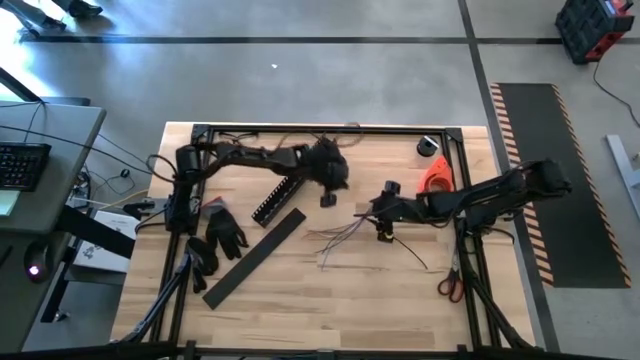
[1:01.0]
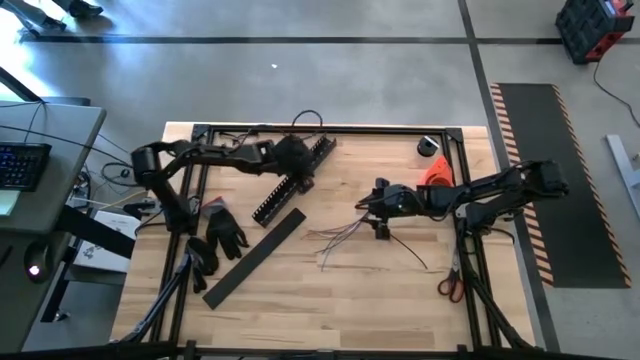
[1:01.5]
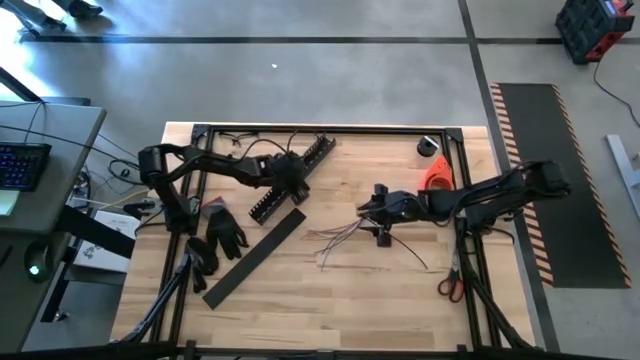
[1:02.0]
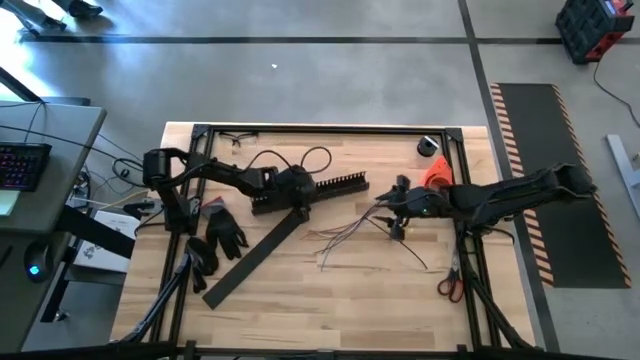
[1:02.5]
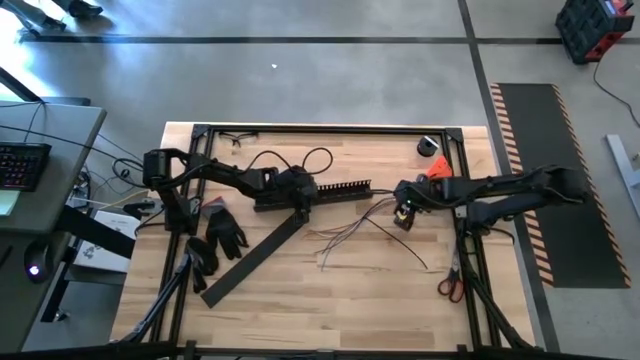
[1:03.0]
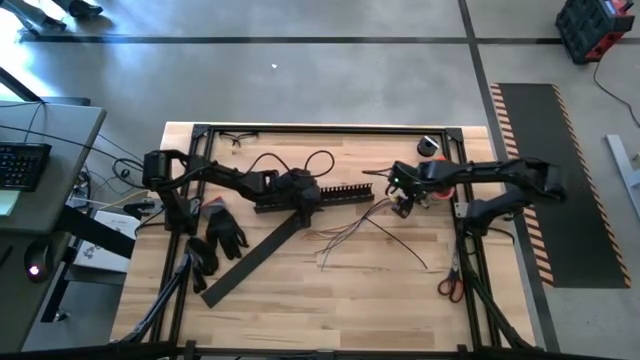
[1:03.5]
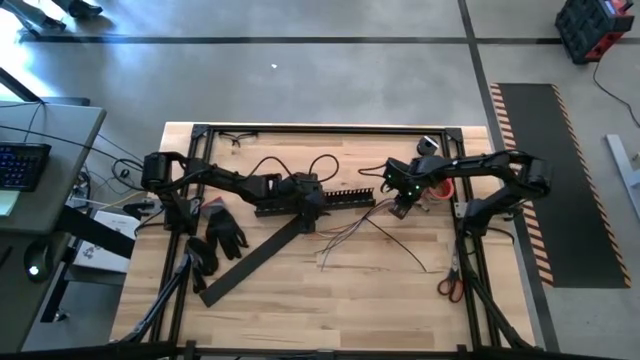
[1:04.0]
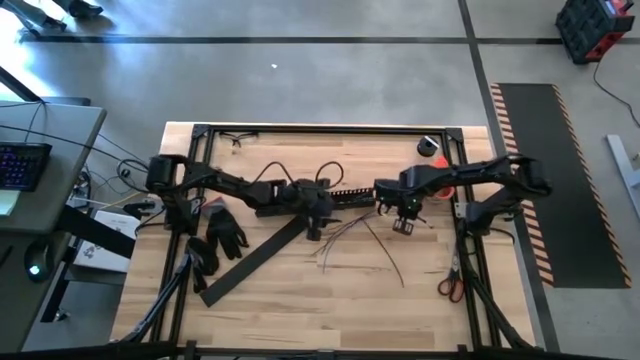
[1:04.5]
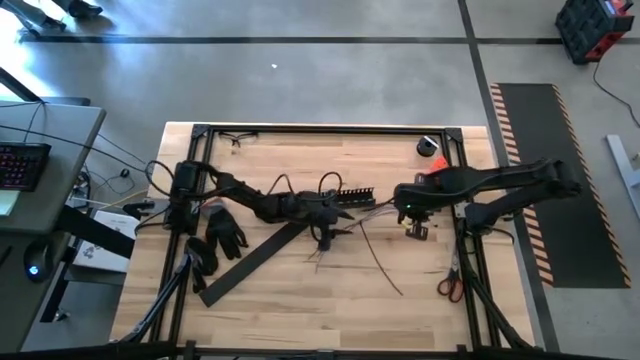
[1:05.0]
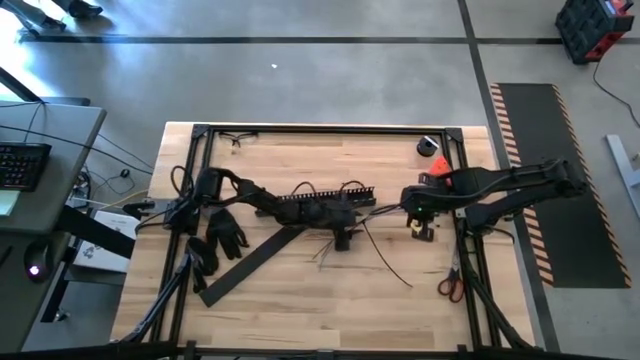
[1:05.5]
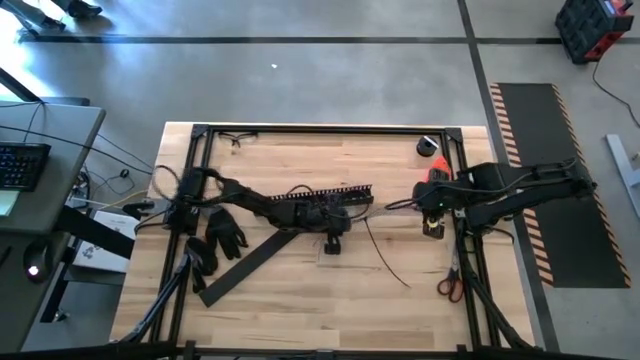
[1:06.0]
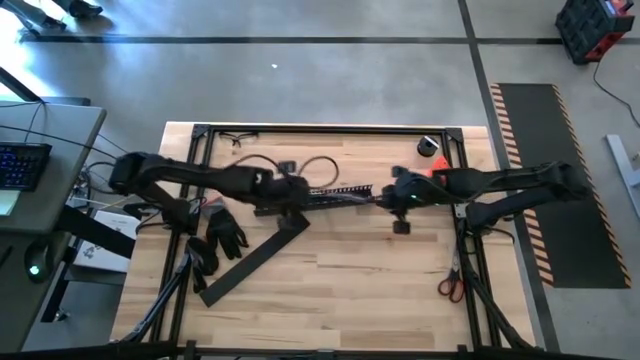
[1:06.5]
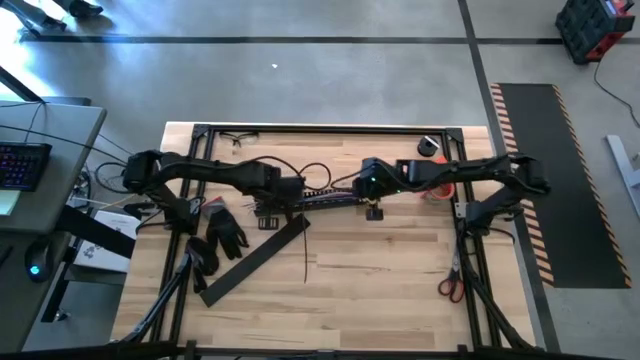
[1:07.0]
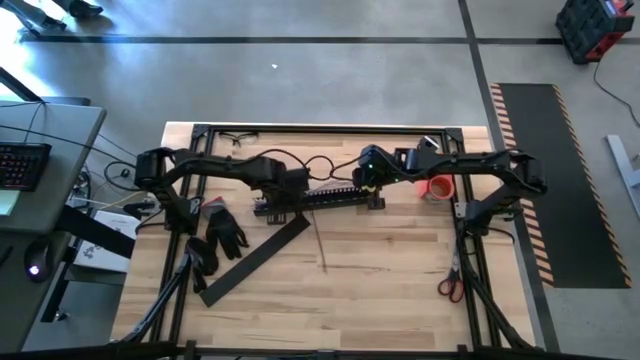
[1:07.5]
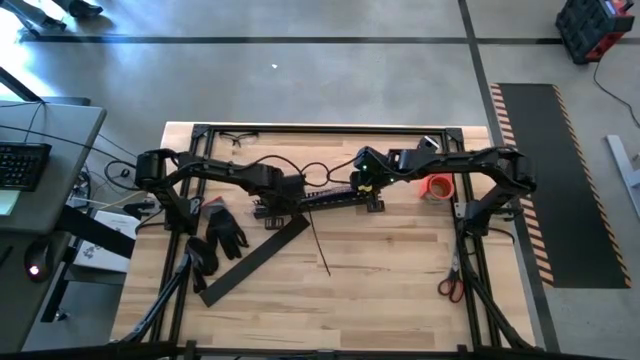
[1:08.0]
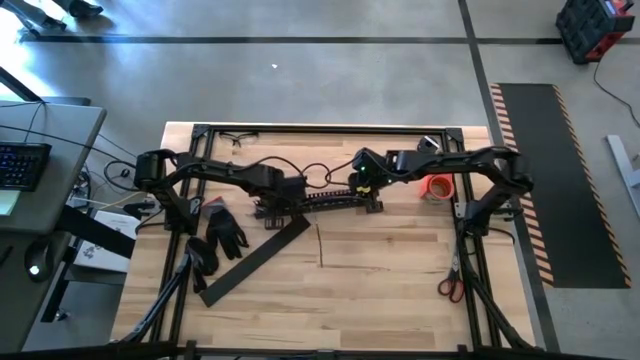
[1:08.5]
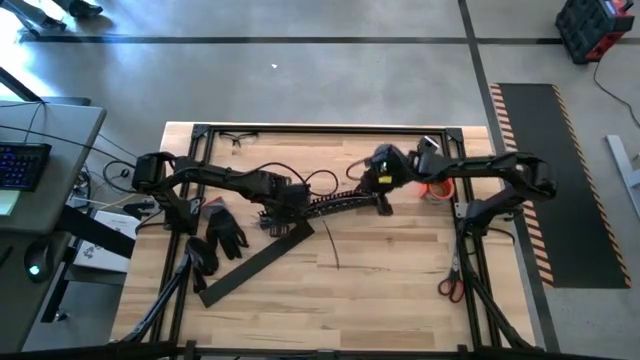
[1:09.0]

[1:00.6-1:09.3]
Task: Ziptie cables
Put the zip-tied cables into the black cable duct

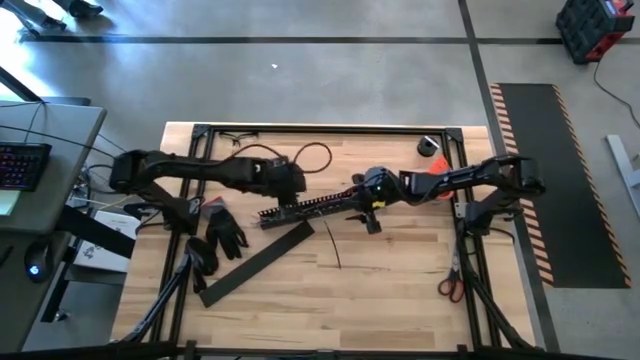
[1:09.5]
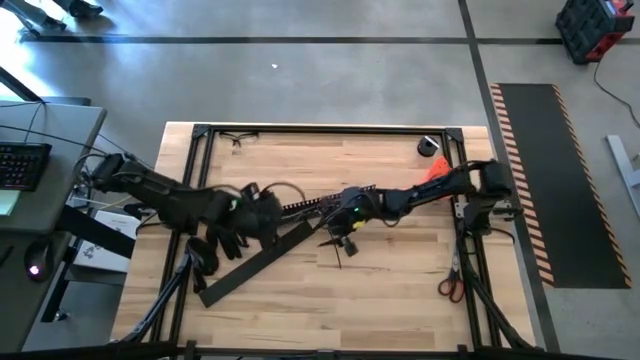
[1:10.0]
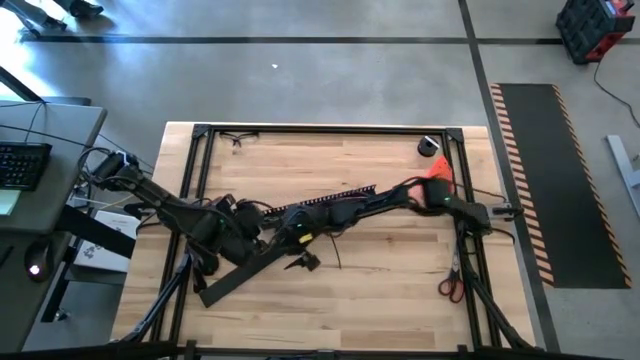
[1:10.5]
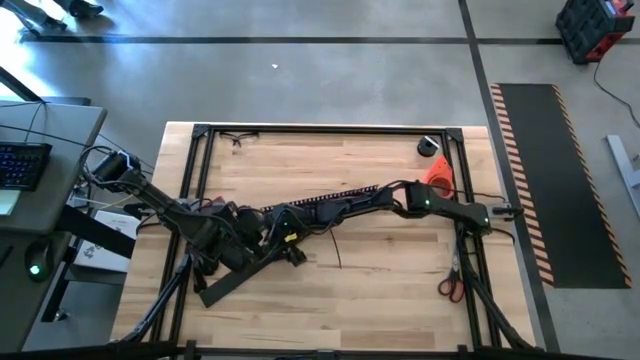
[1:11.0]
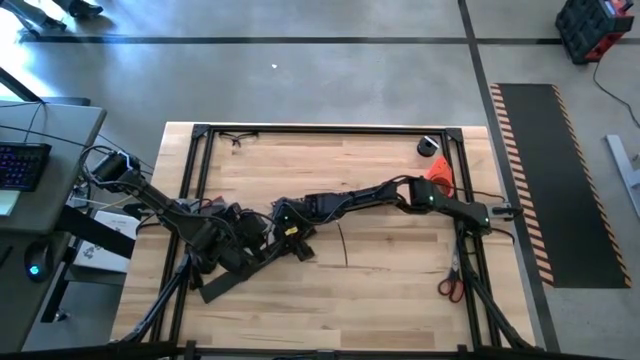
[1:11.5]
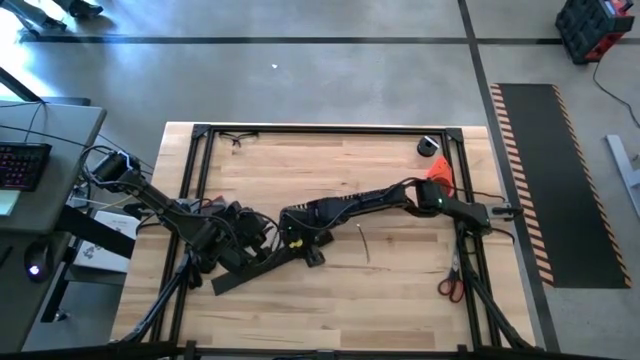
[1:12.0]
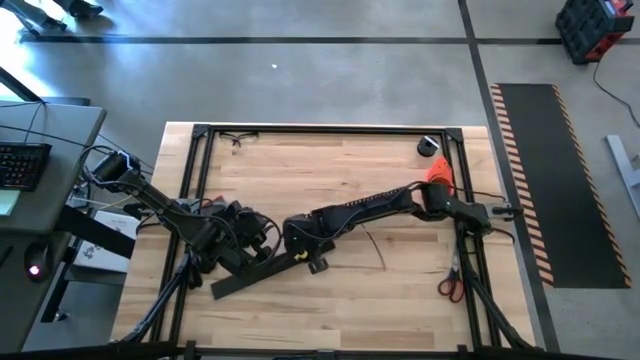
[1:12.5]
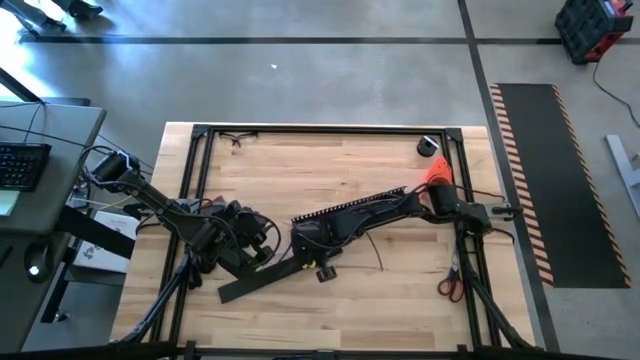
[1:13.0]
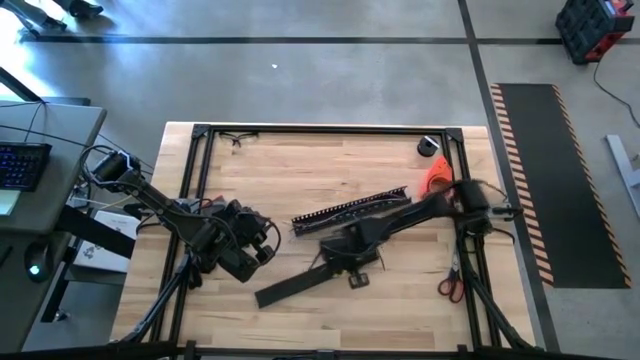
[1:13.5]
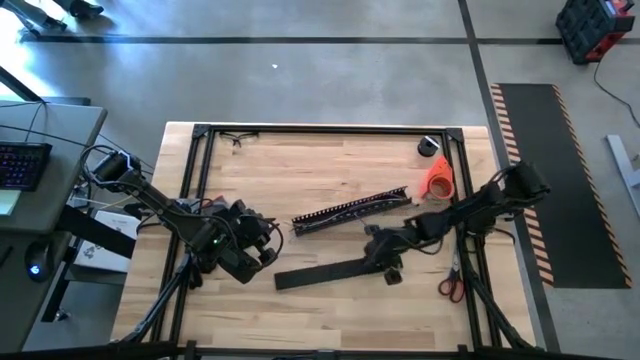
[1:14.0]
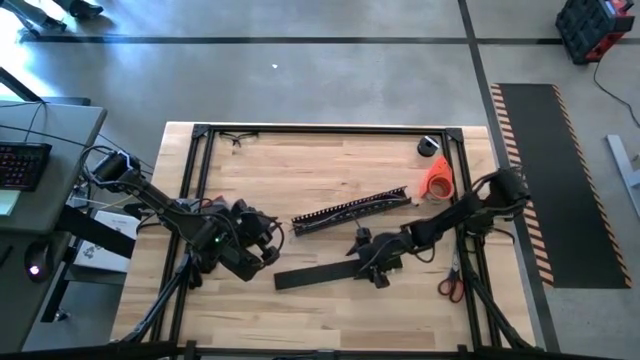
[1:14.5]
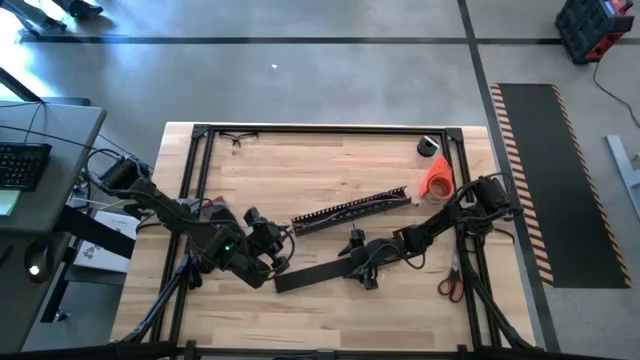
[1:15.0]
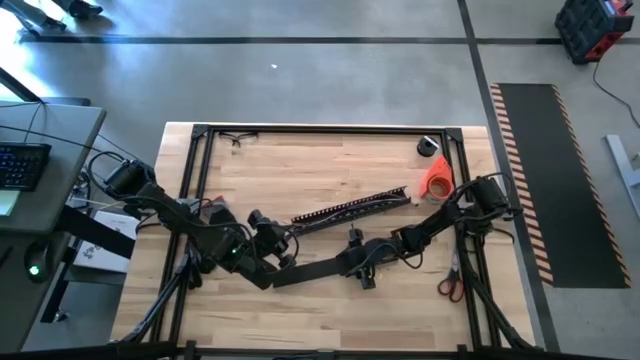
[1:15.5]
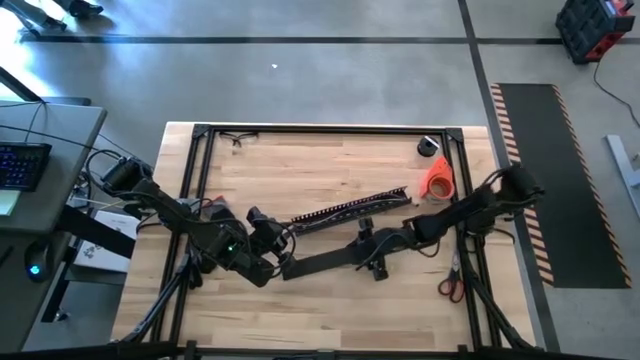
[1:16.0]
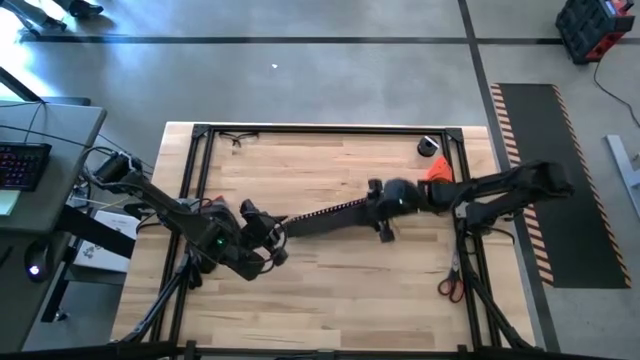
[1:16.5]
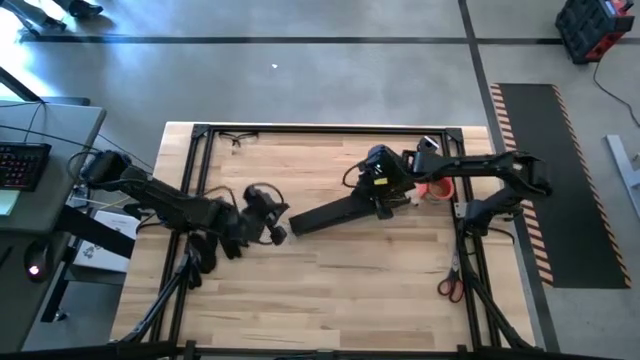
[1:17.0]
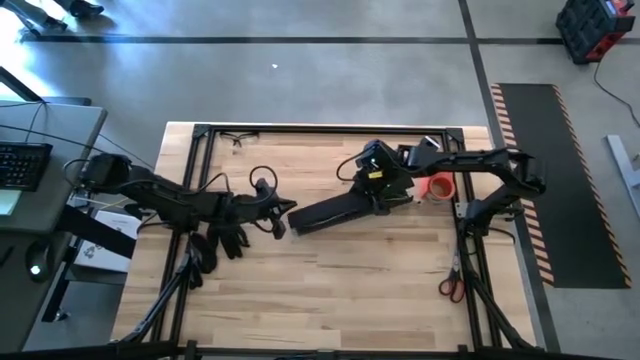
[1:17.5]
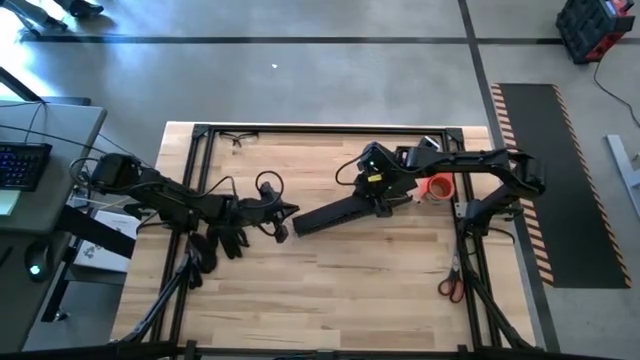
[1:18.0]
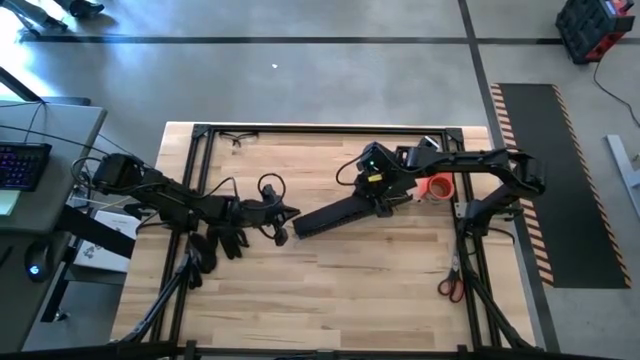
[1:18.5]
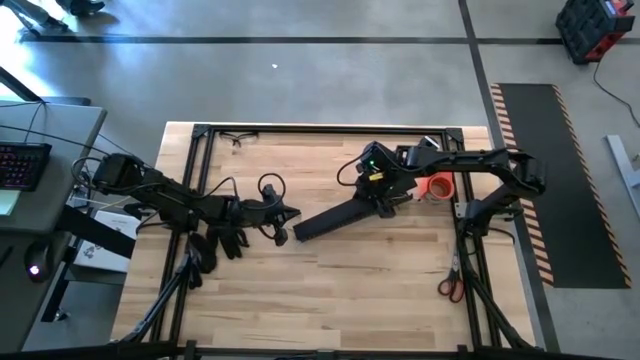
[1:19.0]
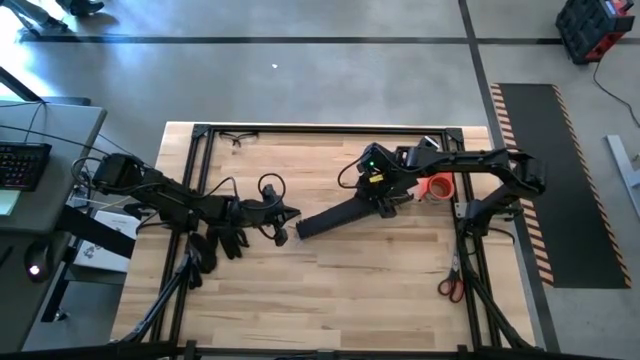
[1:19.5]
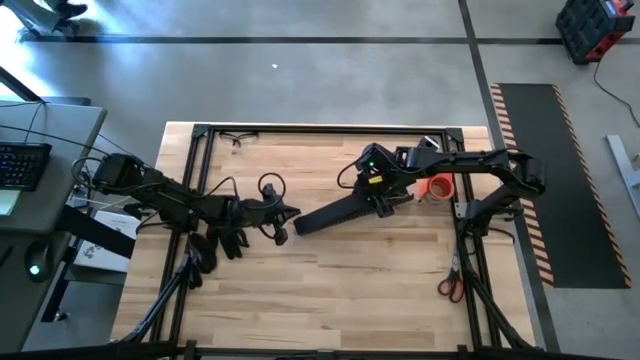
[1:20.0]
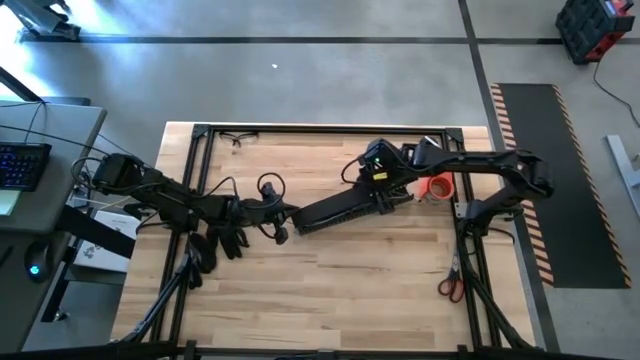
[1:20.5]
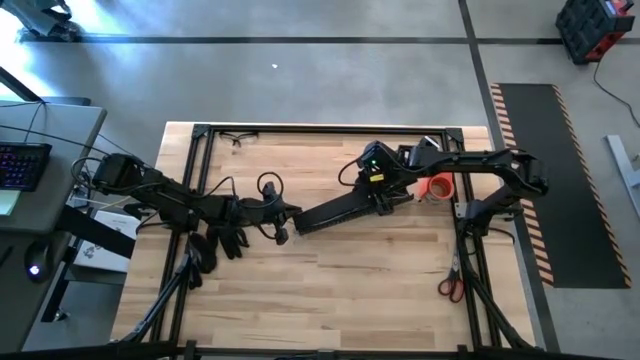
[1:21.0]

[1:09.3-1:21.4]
Close the black cable duct

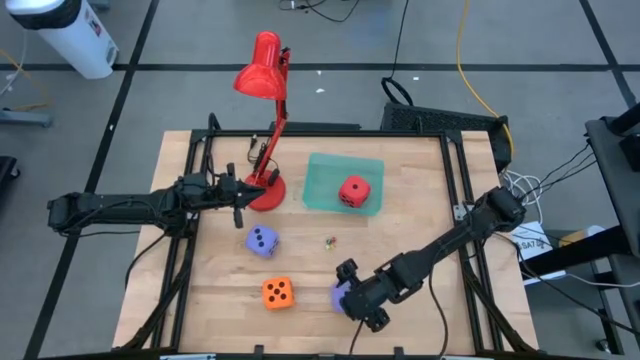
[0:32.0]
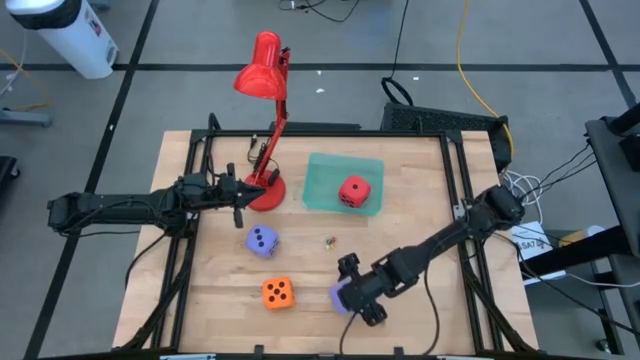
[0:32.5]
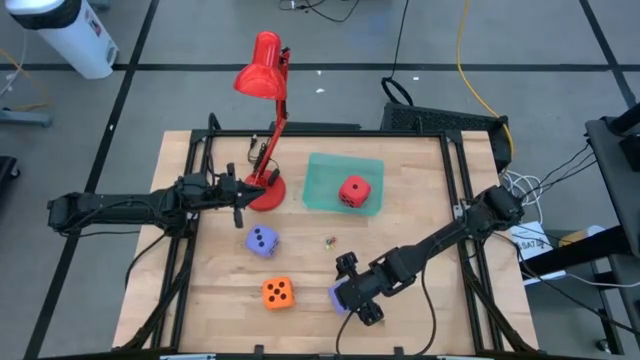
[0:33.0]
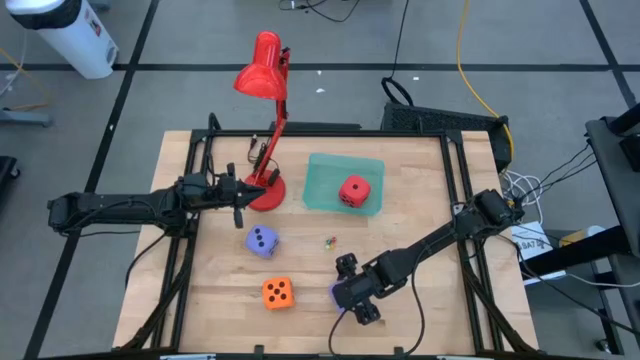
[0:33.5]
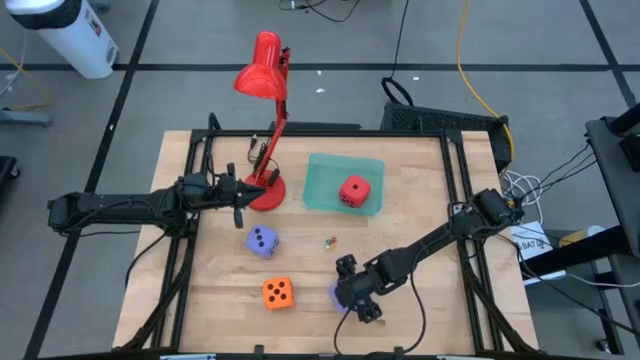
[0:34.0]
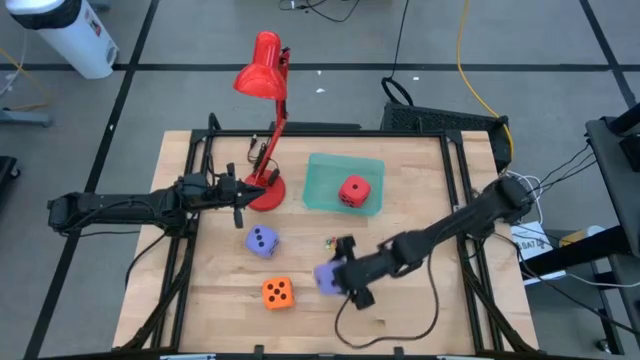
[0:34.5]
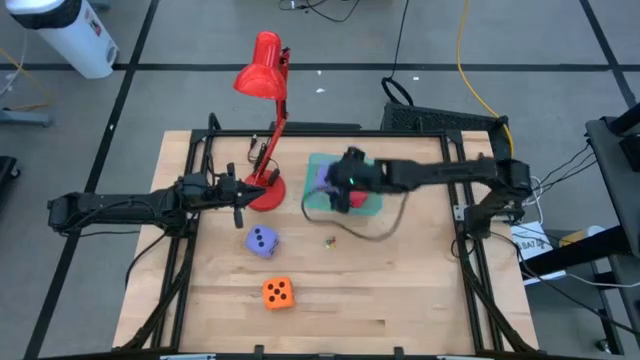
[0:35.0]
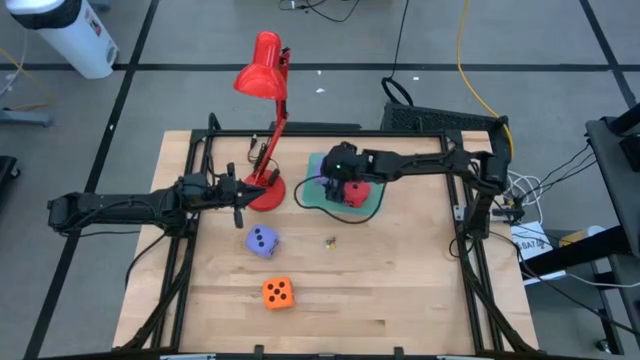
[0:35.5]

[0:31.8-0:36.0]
Task: Pick & Place Dice
Put the bottom large purple die into the blue bin
